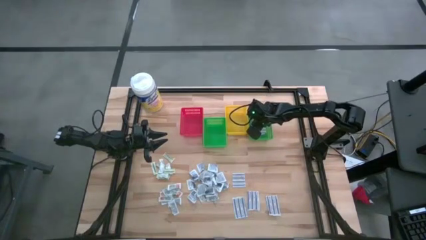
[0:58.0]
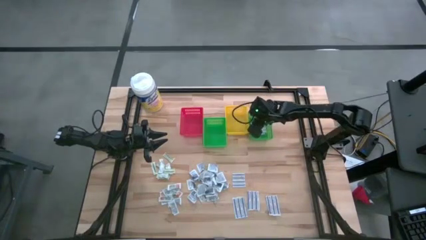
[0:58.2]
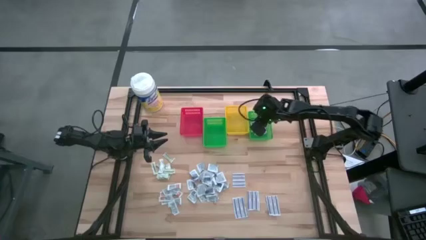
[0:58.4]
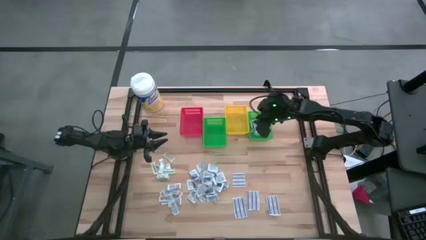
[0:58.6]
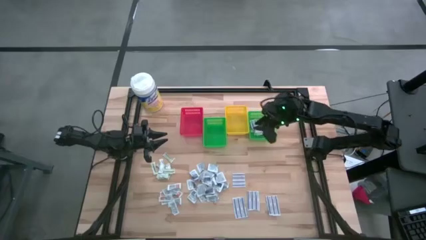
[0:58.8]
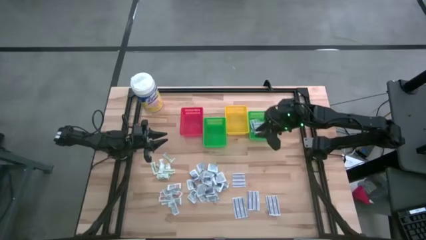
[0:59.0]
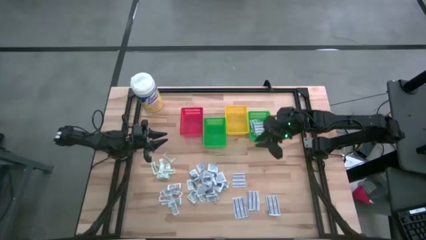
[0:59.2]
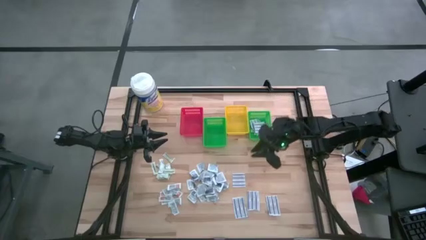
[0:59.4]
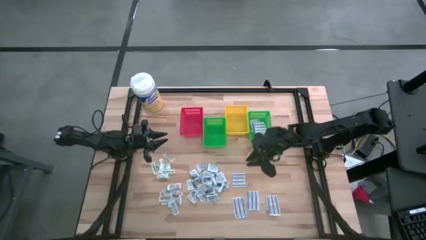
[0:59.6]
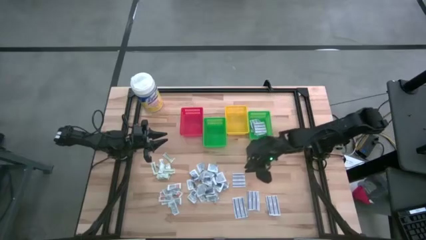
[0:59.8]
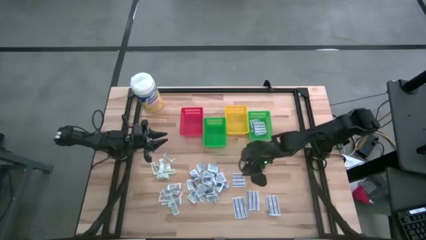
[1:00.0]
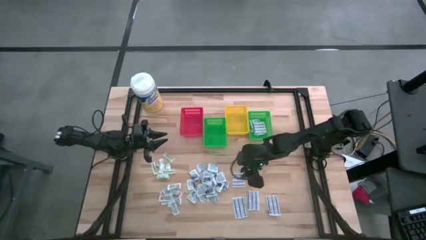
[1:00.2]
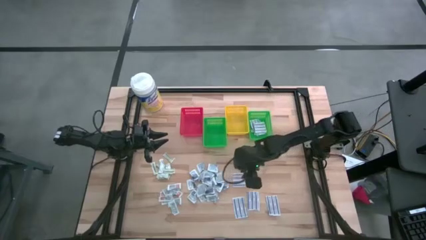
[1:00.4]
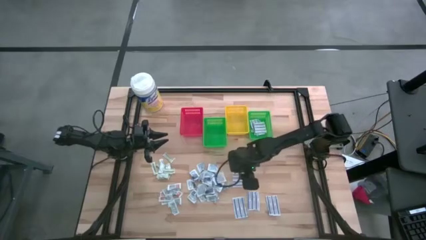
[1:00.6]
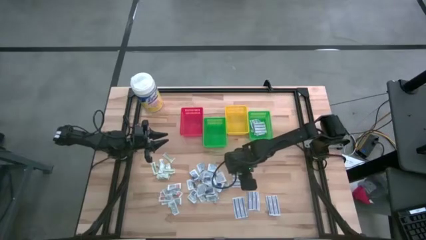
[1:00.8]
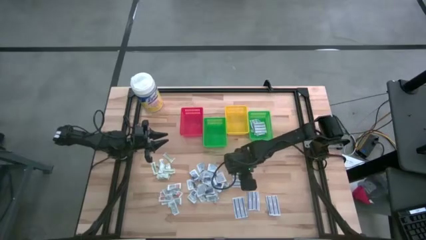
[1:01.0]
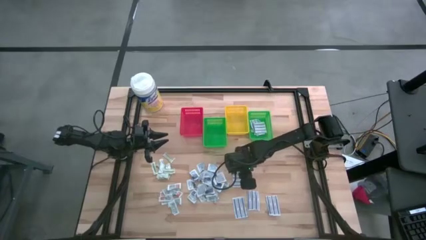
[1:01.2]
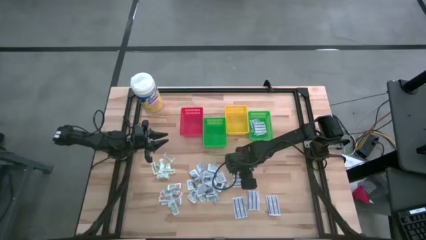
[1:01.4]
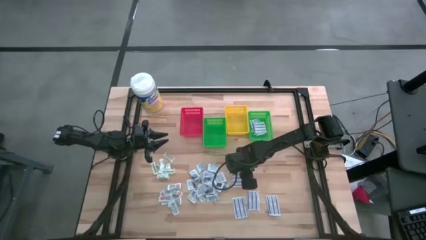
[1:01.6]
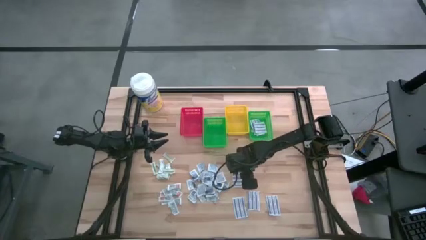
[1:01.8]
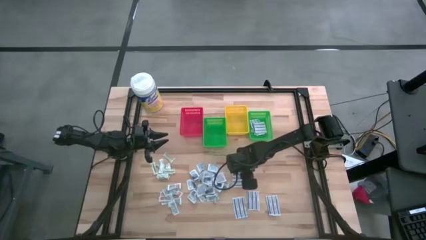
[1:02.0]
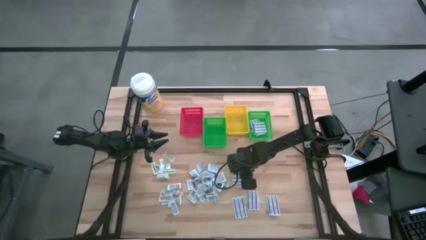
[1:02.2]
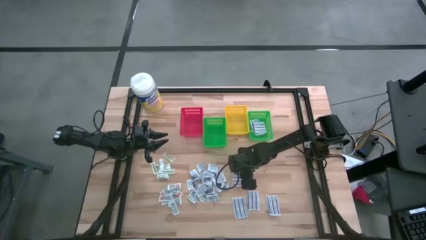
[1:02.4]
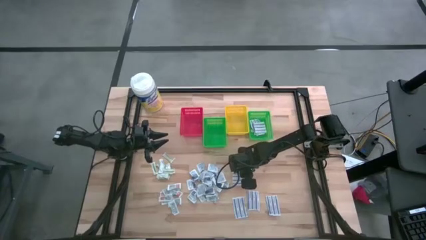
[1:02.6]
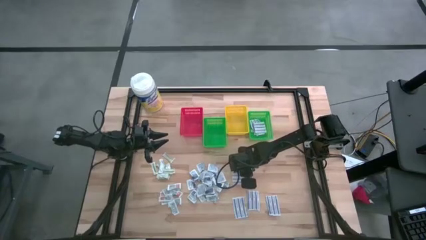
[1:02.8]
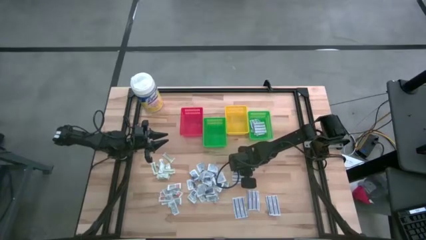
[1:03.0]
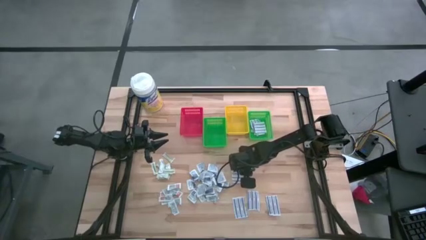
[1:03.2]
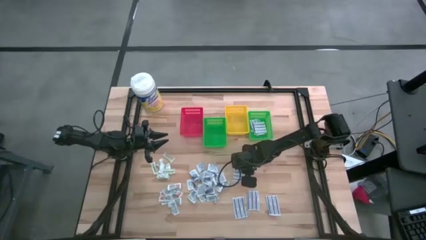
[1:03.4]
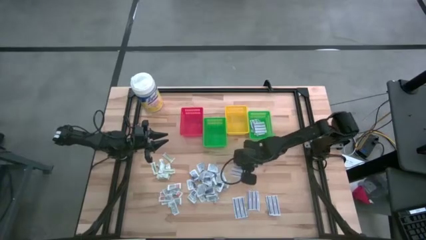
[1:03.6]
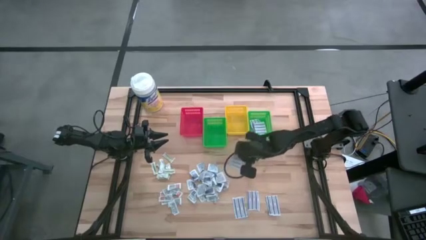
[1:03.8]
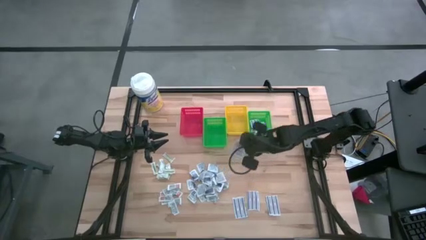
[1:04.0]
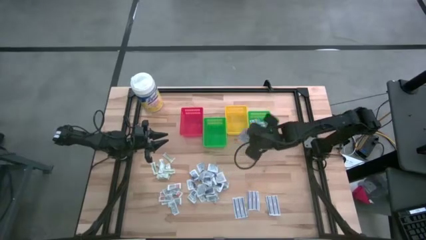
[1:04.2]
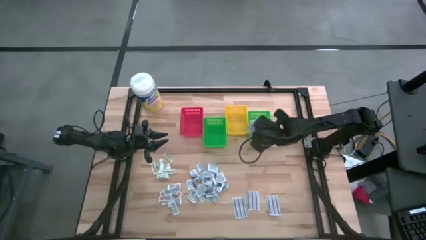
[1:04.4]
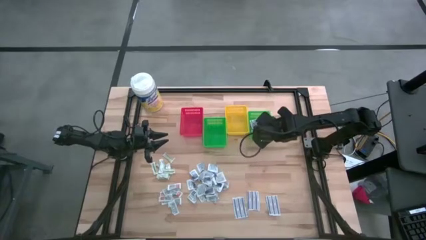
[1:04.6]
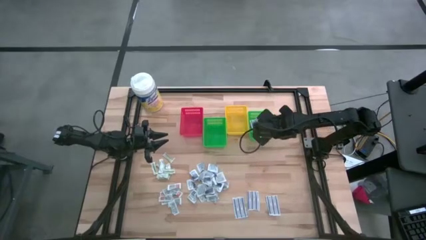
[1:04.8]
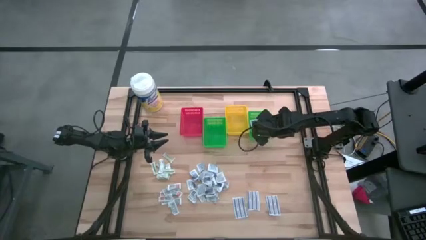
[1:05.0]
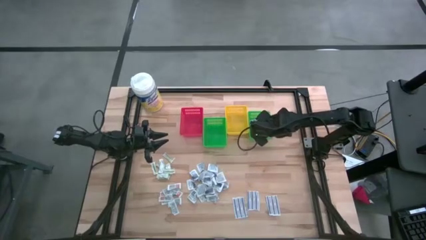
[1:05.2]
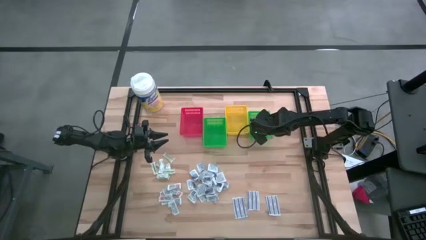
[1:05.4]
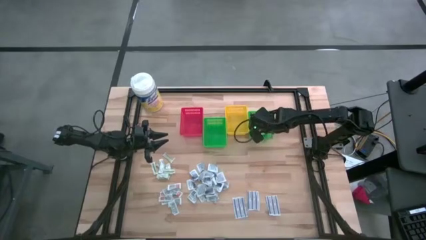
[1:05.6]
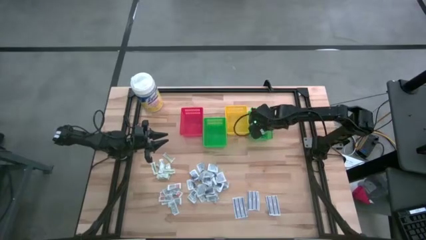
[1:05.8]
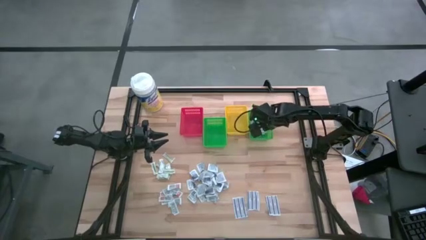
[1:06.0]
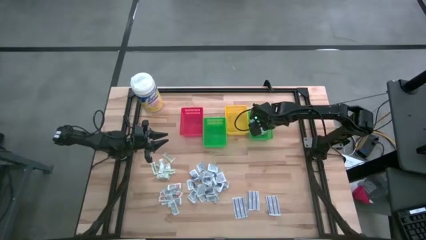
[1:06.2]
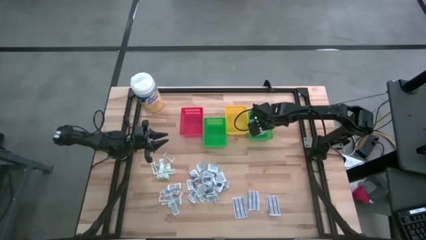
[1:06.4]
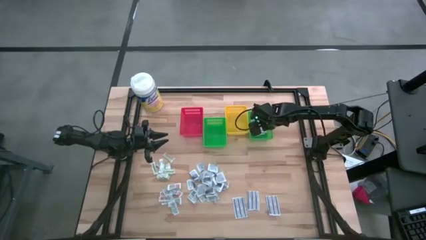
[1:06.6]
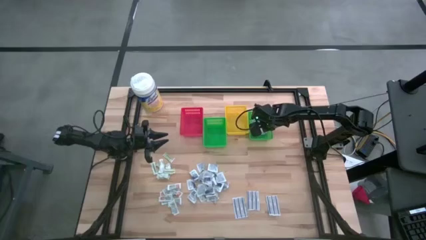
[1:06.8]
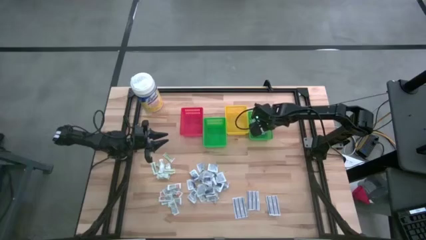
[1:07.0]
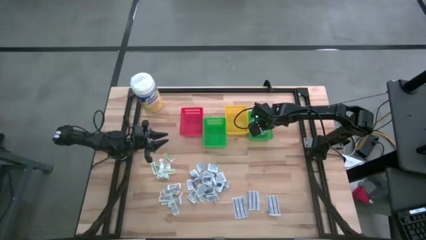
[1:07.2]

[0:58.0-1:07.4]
Task: Pick & Place First Aid Supplies
Put the blue bandage into the right green basket

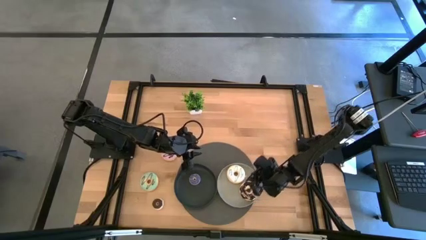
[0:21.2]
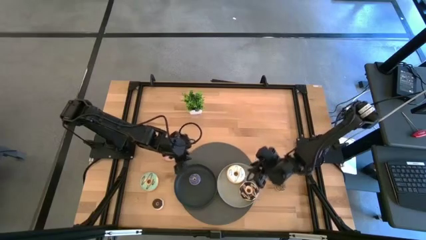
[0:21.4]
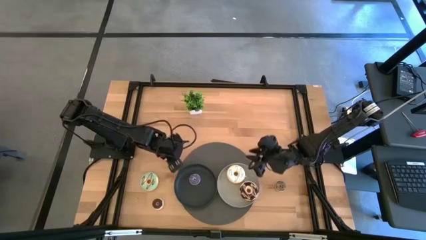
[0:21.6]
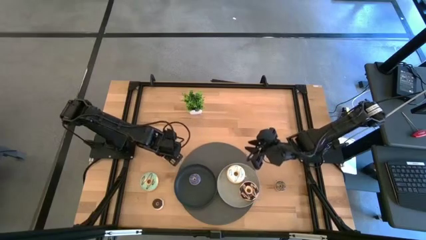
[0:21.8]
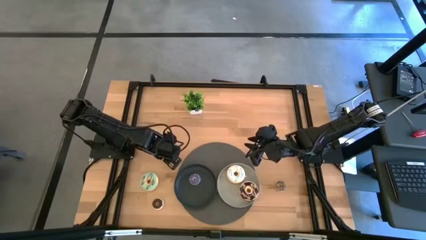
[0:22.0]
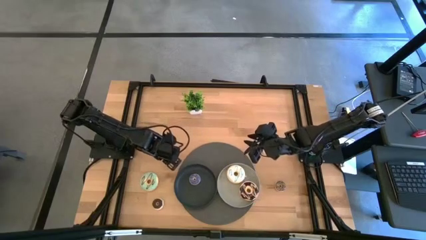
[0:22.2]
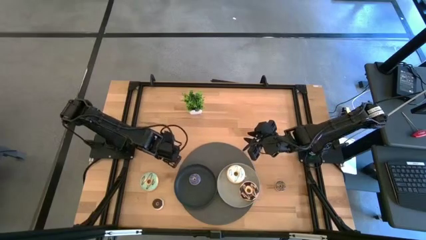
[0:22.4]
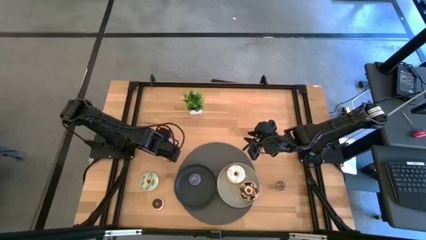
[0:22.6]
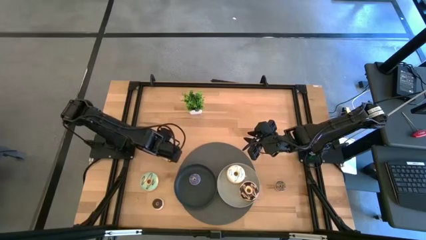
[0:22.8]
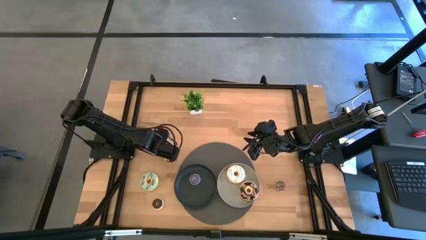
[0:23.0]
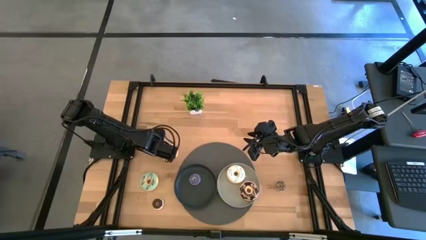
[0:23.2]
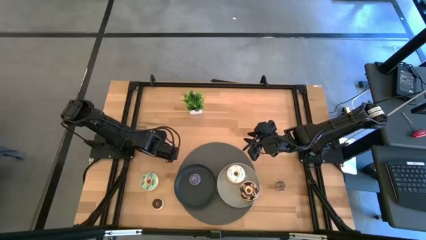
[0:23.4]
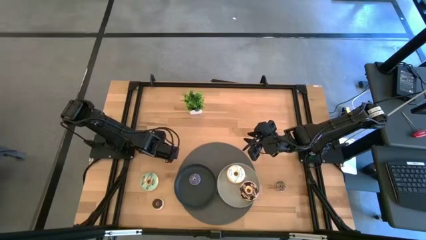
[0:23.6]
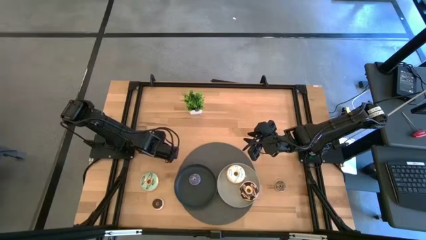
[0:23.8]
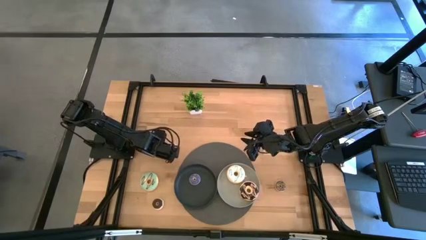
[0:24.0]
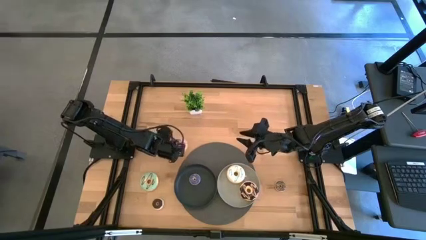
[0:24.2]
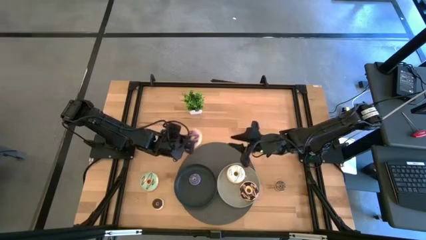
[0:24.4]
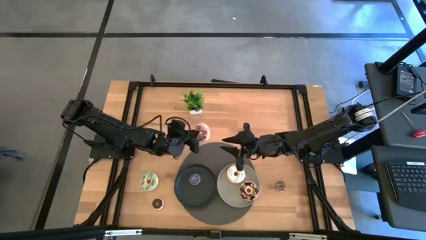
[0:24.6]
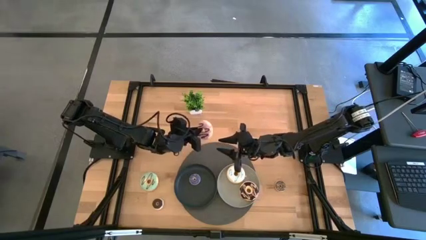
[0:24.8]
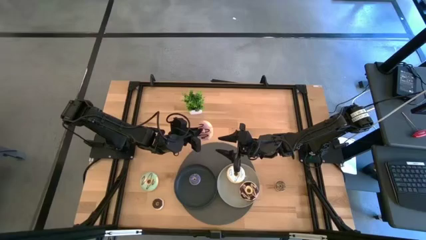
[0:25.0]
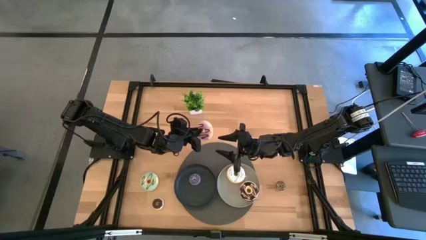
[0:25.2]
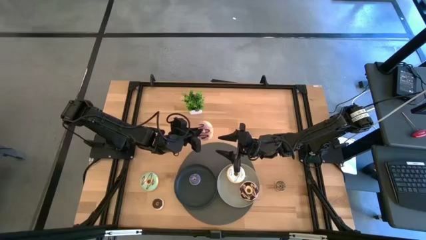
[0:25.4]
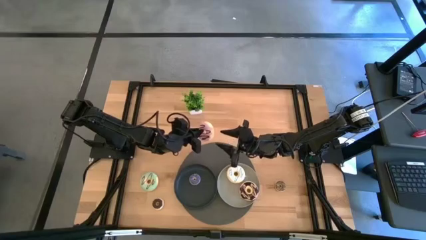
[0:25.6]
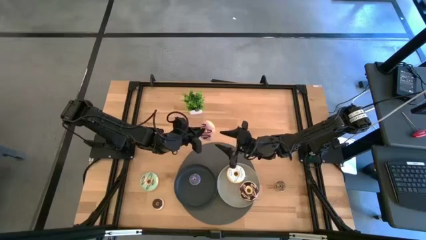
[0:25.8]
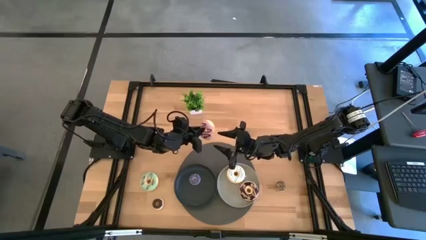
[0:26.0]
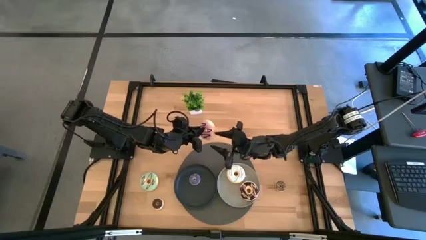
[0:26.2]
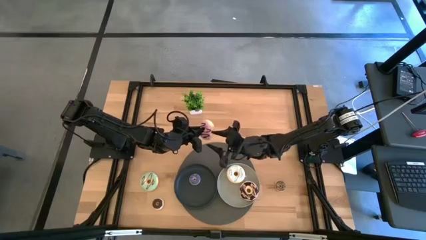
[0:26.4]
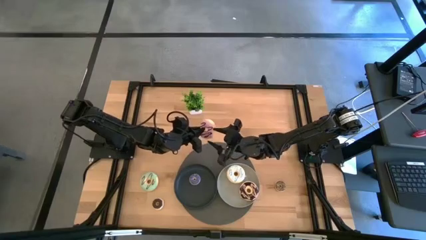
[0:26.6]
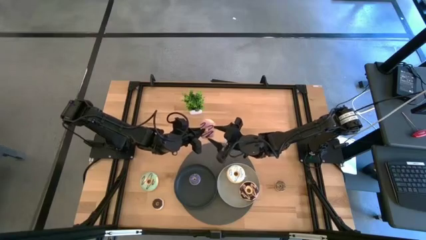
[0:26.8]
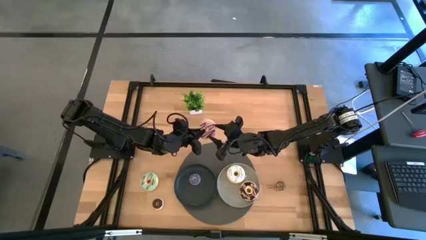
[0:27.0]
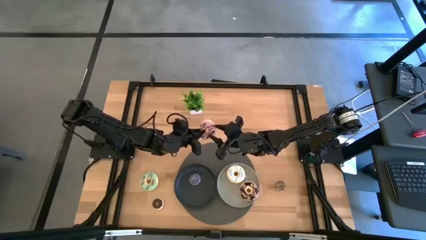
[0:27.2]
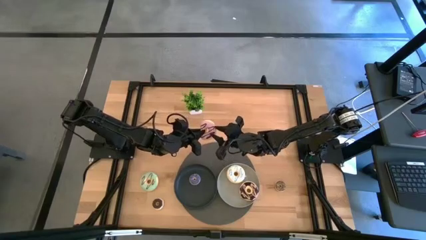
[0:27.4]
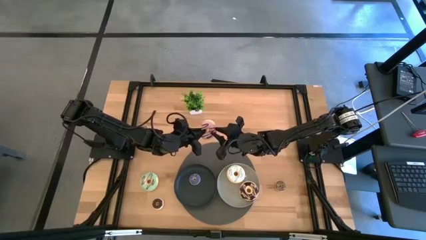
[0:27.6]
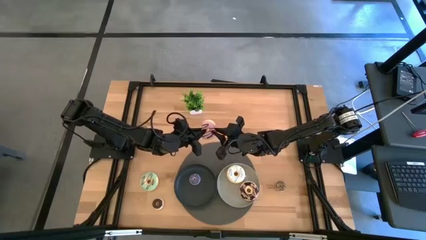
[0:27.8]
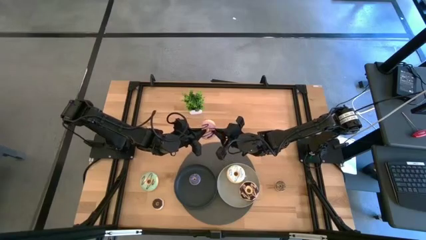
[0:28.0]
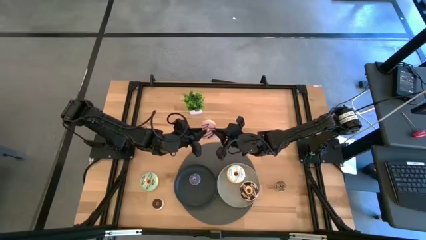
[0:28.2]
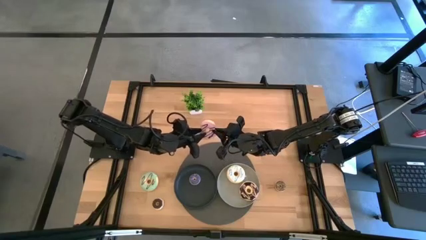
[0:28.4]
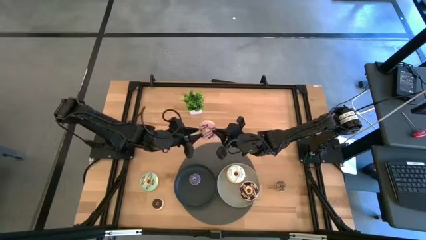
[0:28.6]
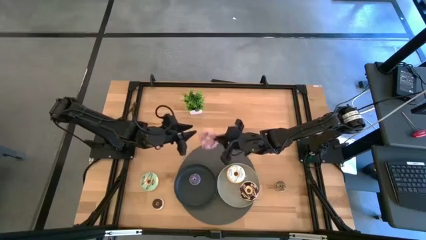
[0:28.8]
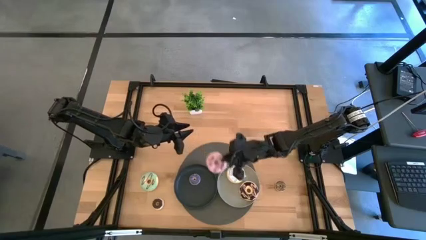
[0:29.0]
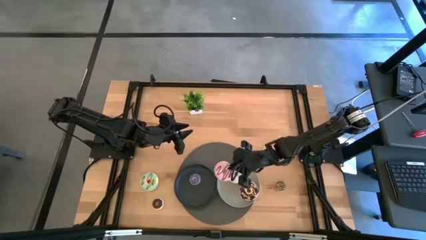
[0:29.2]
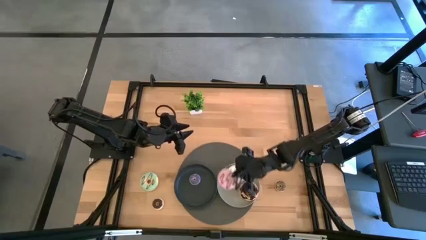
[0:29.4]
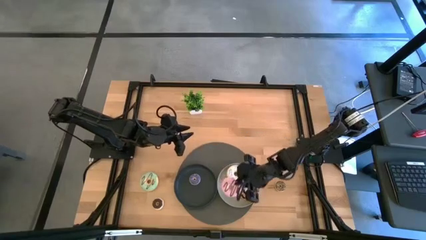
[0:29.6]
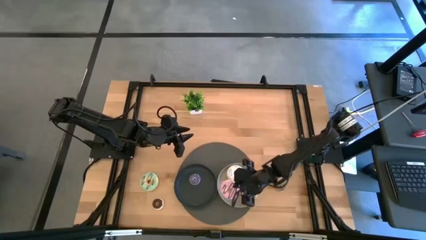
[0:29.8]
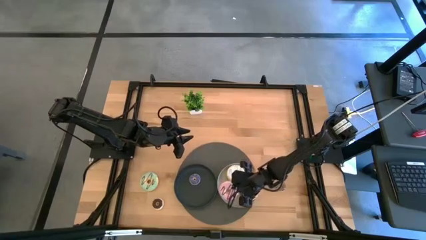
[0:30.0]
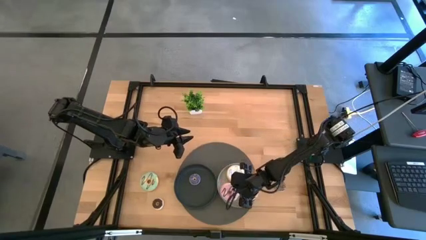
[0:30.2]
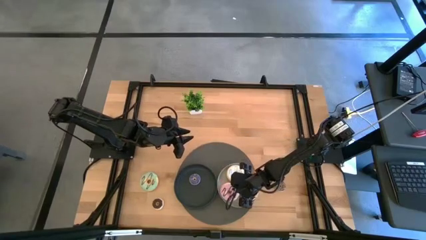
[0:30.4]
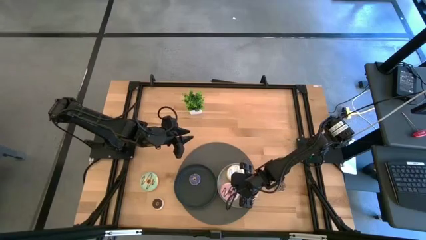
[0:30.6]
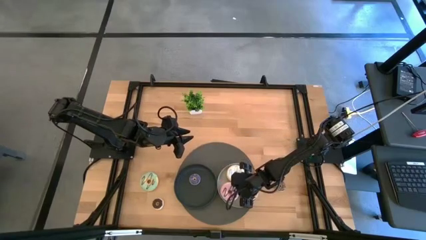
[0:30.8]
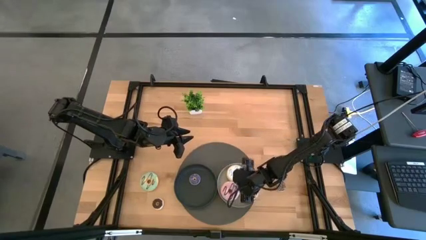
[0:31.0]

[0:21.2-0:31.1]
Task: Pick & Place donuts
Put the large pink donut on the gray plate
